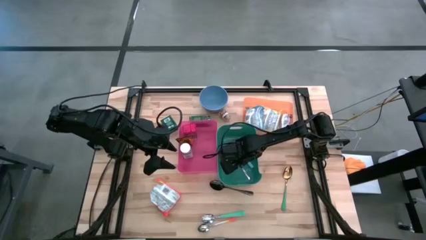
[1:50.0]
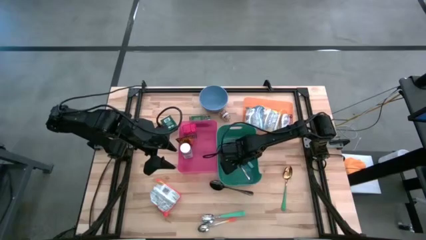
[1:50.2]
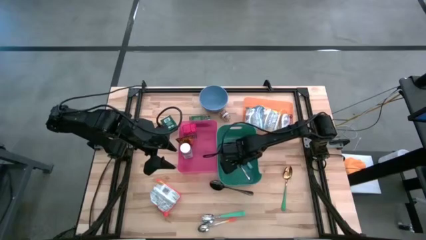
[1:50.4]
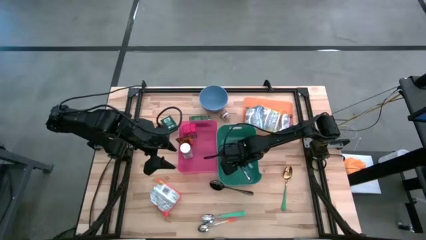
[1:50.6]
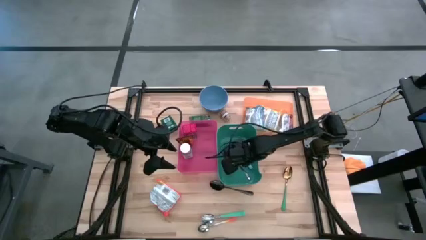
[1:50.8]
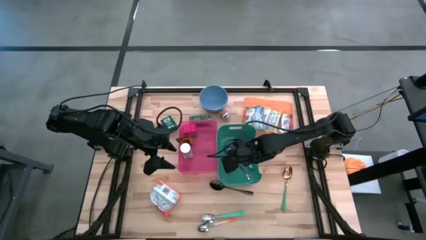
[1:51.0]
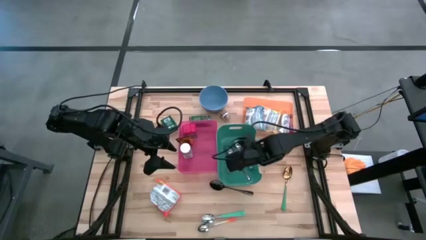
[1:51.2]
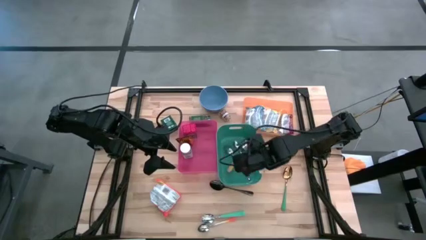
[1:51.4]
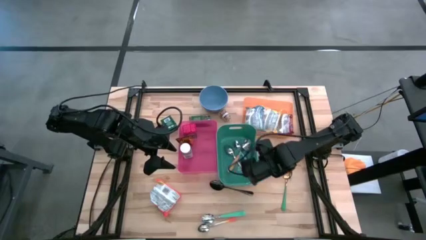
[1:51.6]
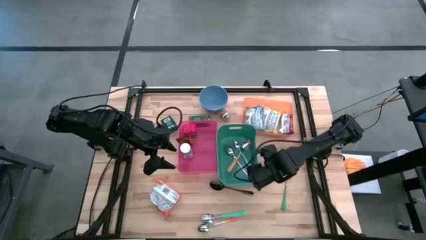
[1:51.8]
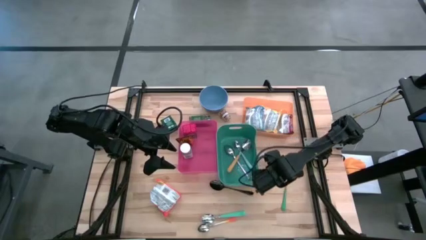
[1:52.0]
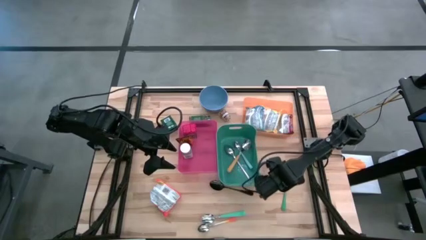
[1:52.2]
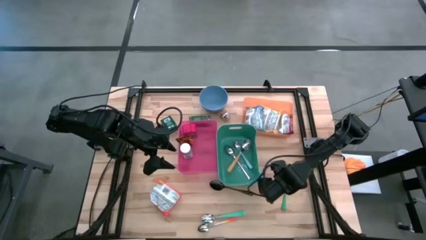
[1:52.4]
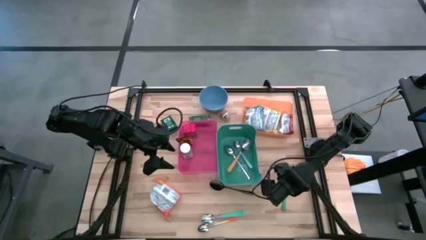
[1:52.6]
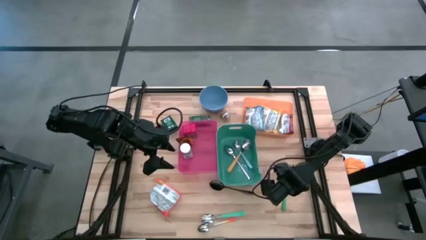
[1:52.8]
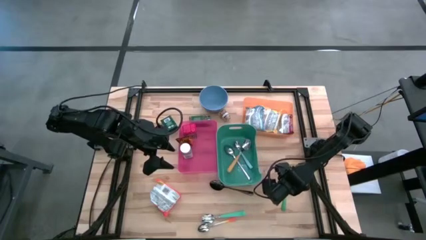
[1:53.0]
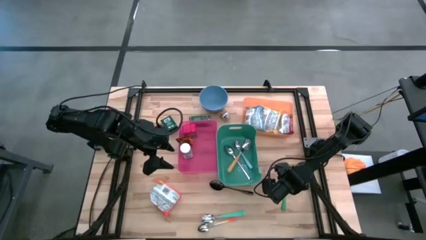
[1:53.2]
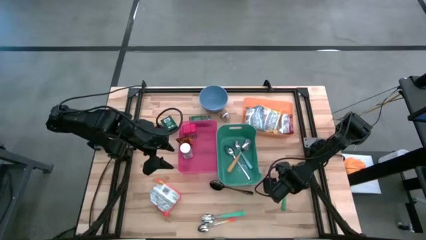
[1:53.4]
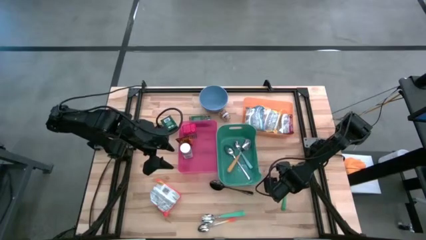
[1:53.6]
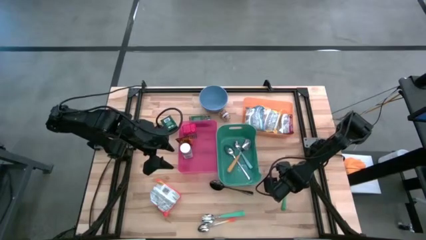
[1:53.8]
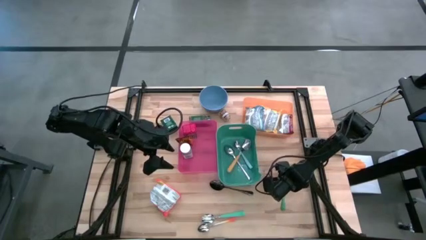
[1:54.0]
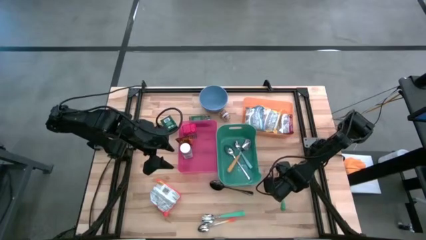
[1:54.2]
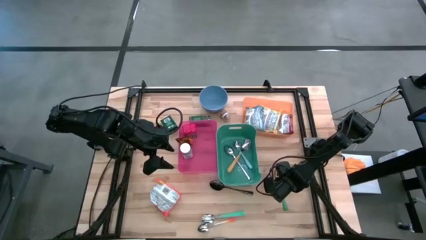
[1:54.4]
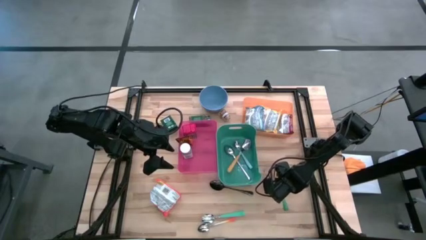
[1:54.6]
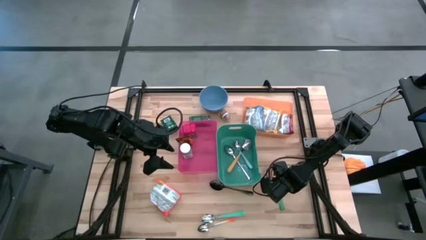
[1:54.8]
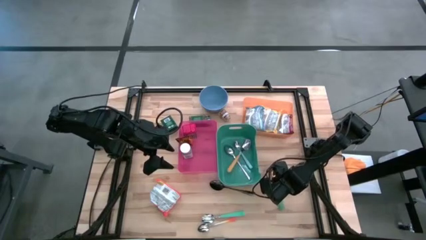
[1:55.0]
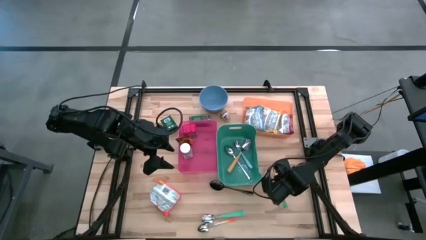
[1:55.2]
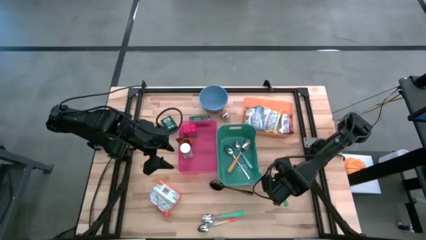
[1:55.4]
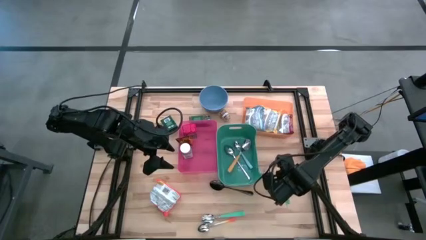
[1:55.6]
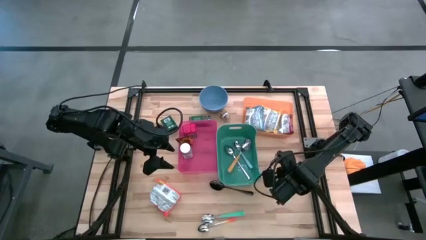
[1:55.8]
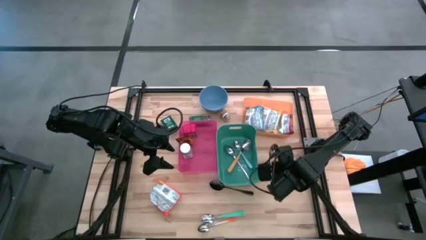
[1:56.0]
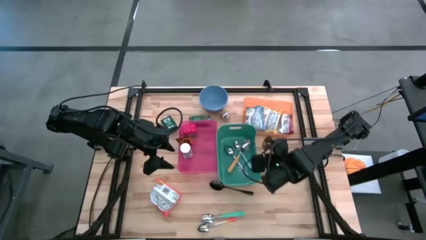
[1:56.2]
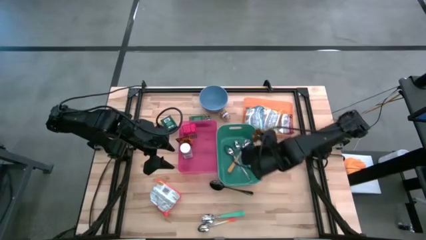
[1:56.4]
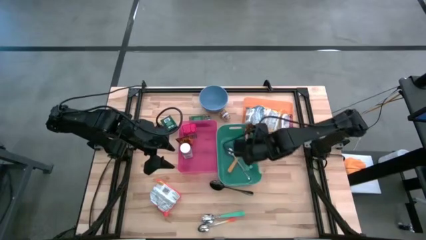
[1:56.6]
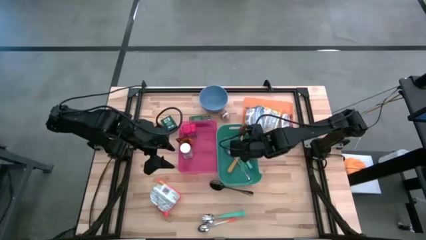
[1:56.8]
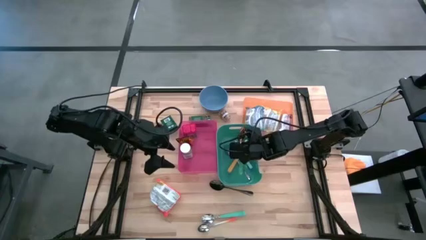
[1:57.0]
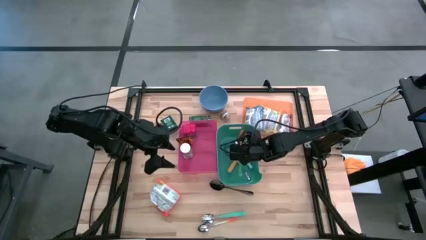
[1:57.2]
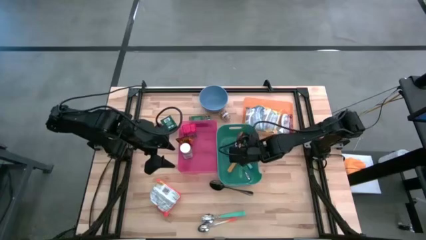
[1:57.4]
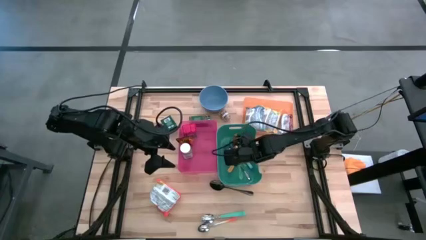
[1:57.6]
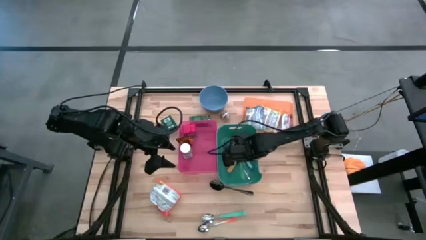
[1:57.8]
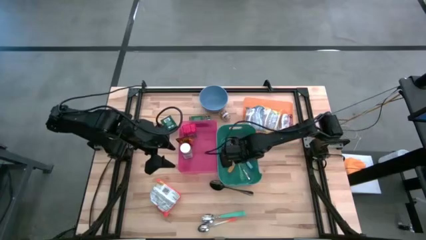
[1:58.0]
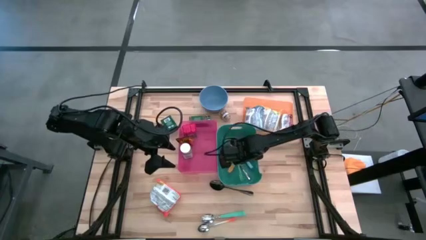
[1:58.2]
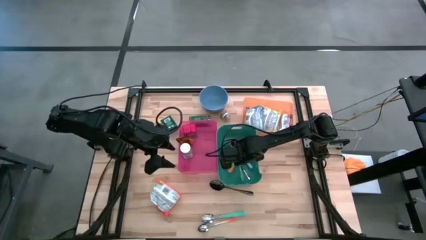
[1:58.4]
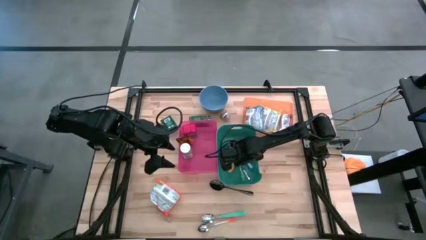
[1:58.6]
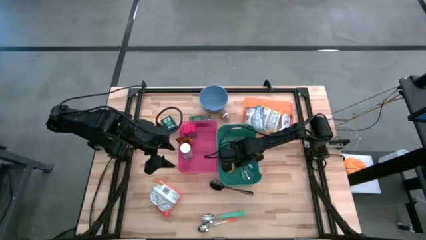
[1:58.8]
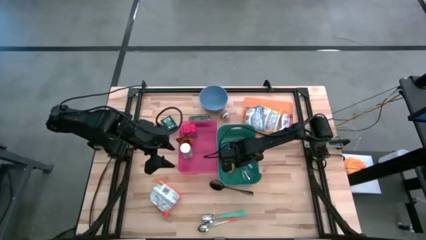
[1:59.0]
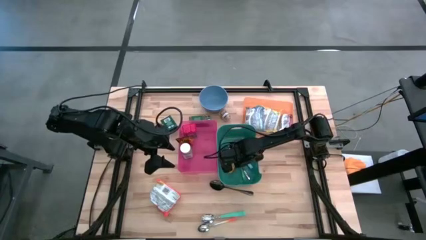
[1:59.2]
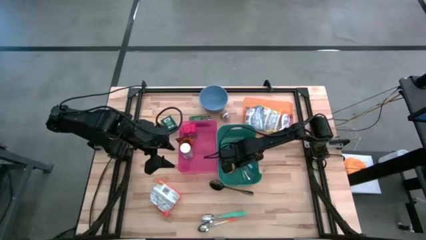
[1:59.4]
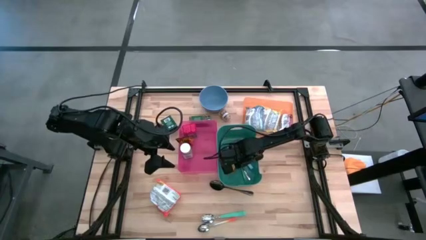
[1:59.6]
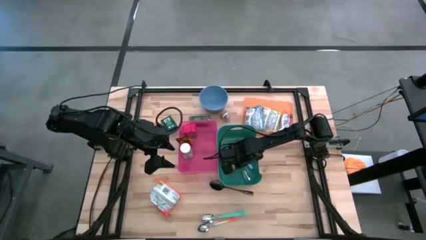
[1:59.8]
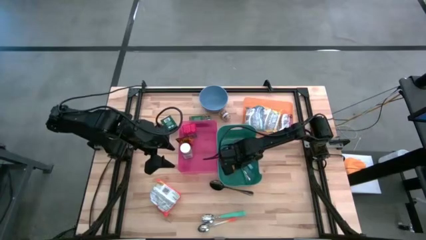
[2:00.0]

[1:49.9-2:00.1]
Put the green spoon into the green bin

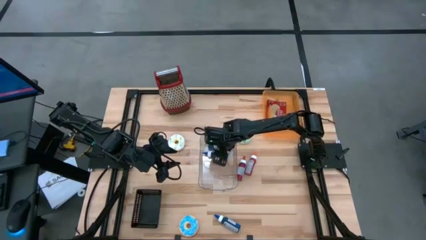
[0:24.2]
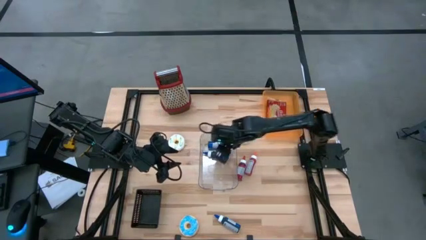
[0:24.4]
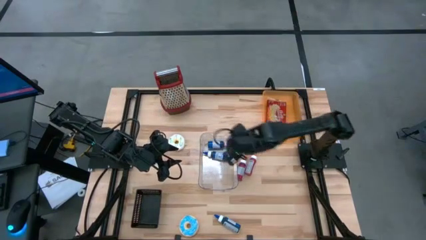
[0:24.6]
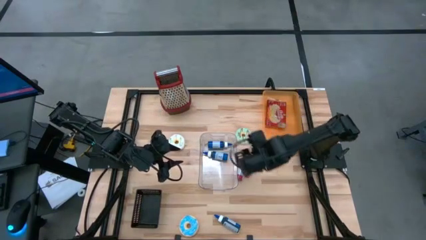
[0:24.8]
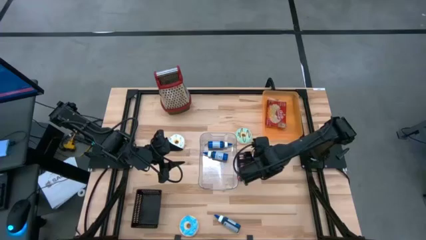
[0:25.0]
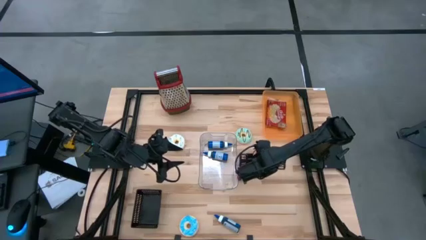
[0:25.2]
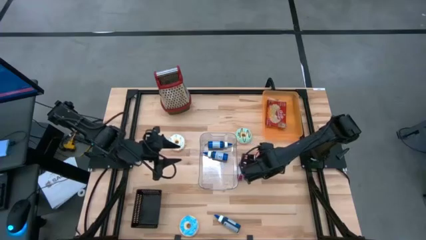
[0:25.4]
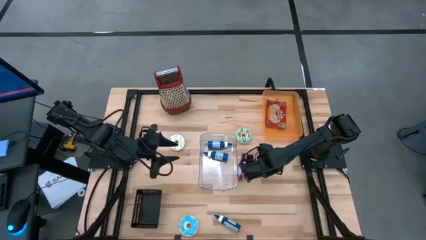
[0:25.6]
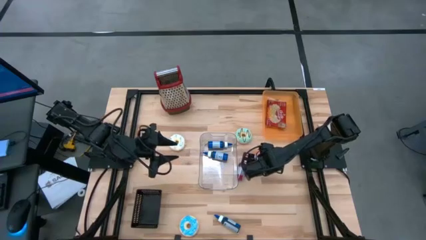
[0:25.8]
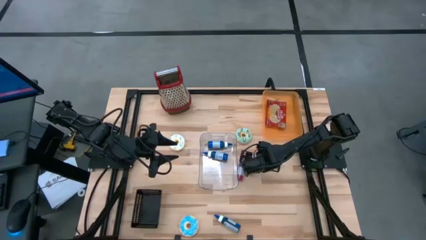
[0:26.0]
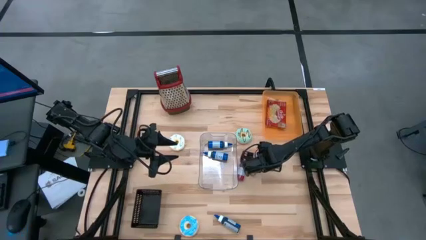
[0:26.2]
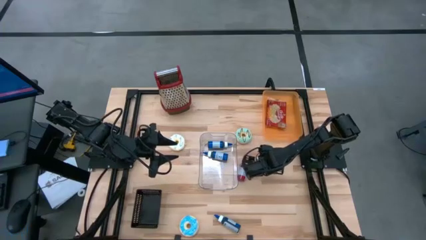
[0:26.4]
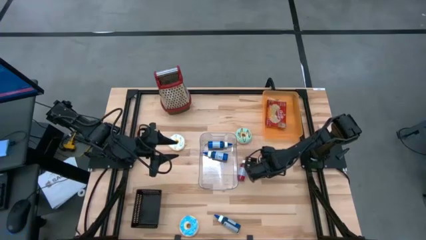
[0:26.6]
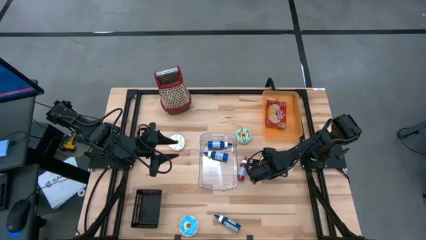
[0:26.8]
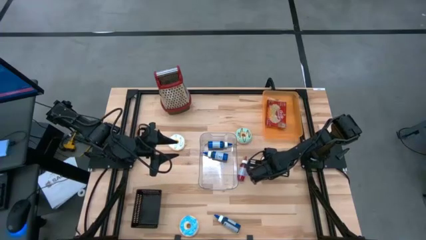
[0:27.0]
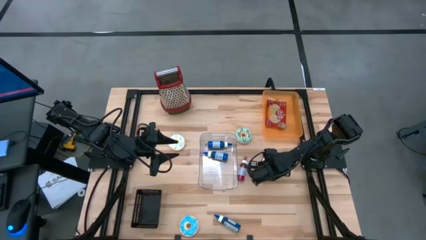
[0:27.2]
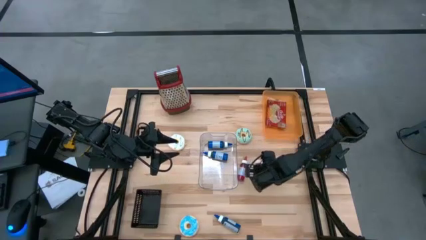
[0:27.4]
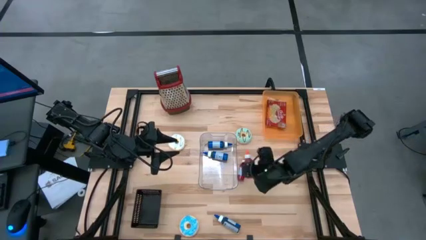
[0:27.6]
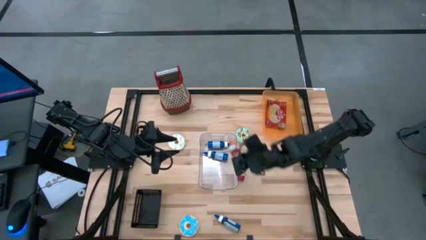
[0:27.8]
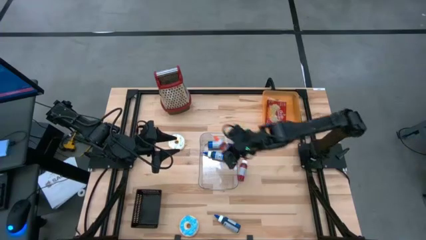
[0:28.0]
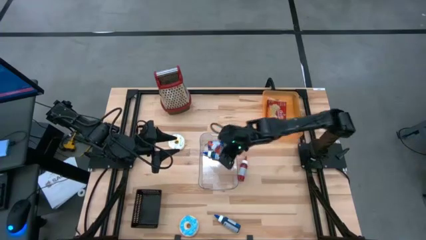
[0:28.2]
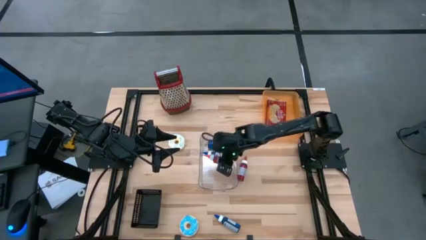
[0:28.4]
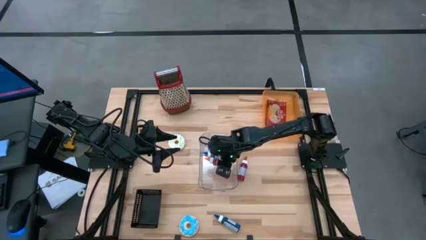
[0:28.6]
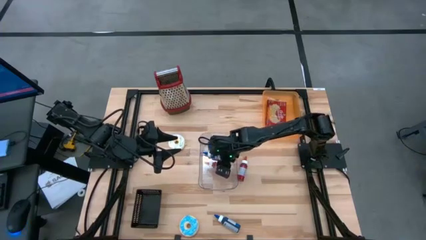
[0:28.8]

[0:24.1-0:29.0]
Put the orange food coloring bottle into the transparent bin

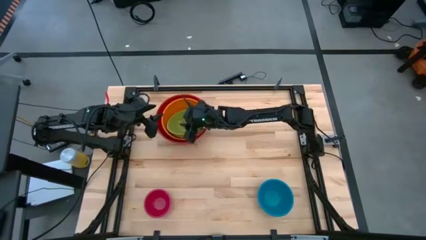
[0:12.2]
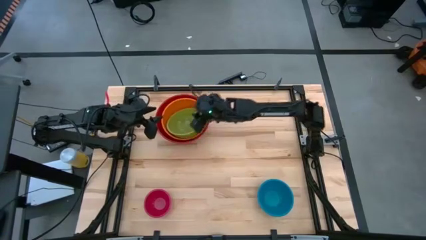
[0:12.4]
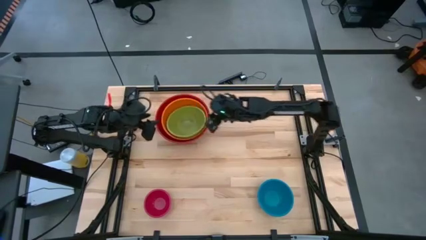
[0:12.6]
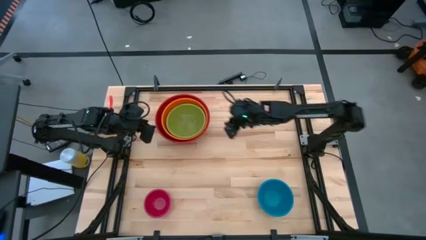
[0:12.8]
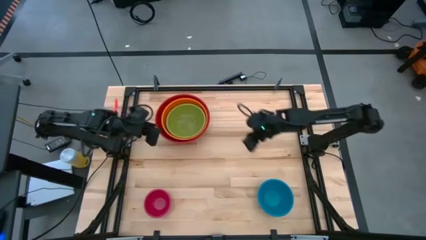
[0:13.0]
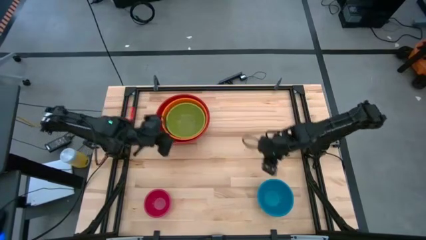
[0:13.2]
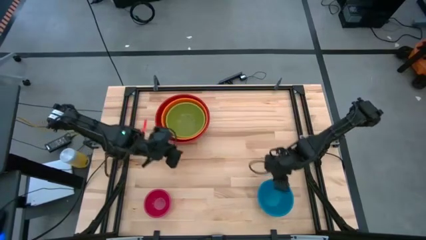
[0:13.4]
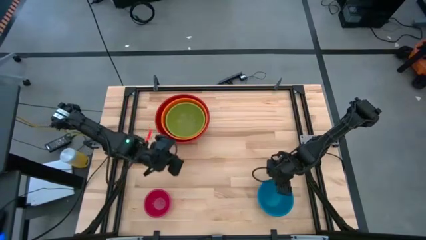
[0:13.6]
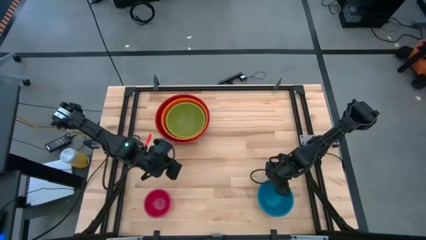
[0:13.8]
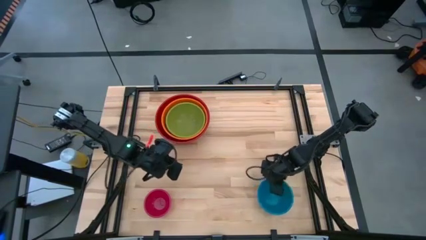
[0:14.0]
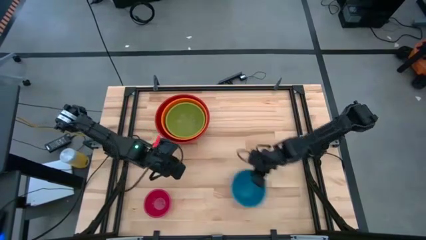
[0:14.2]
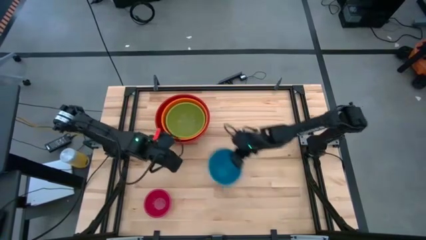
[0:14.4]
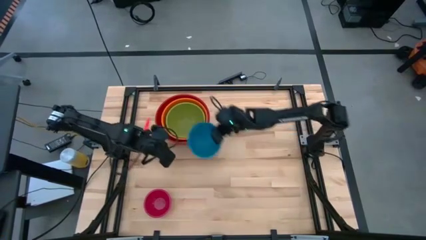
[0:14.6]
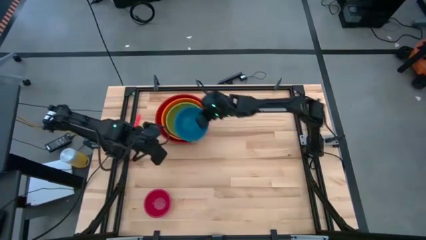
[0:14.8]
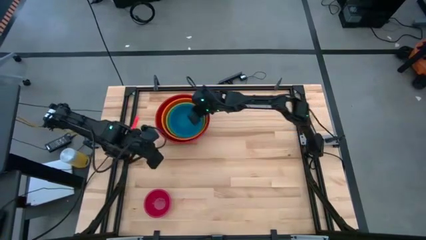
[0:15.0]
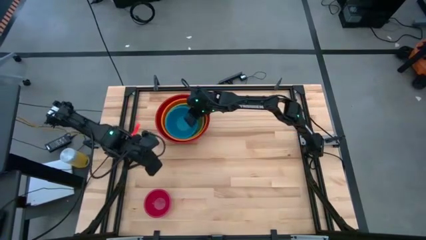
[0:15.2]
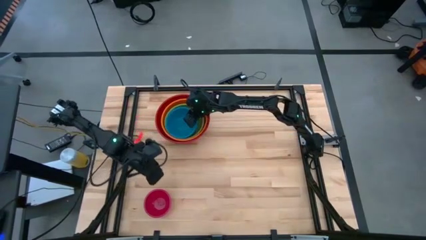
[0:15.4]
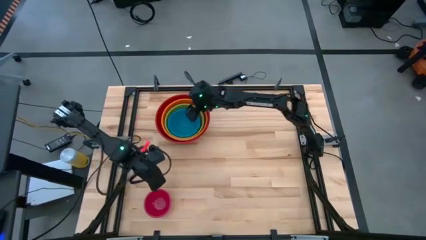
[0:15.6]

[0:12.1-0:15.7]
Stack the blue bowl on top of the green bowl
